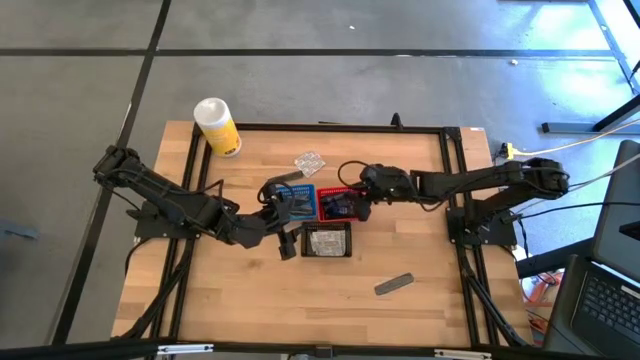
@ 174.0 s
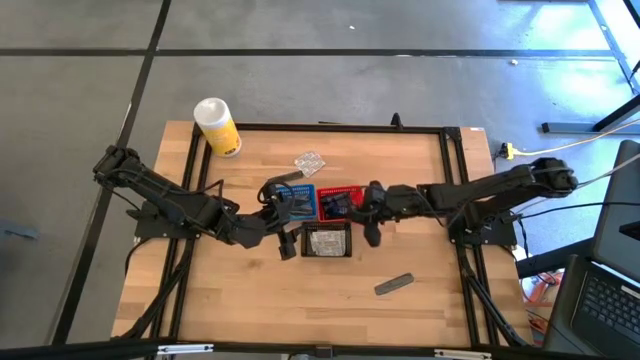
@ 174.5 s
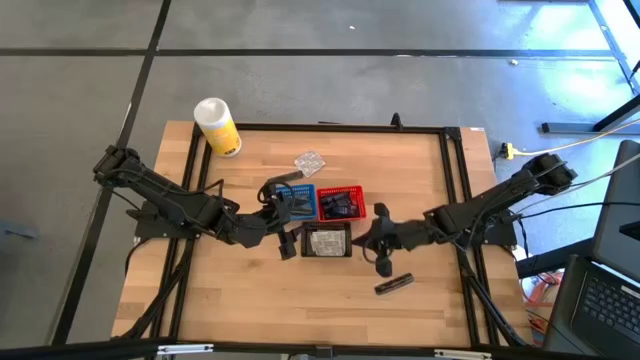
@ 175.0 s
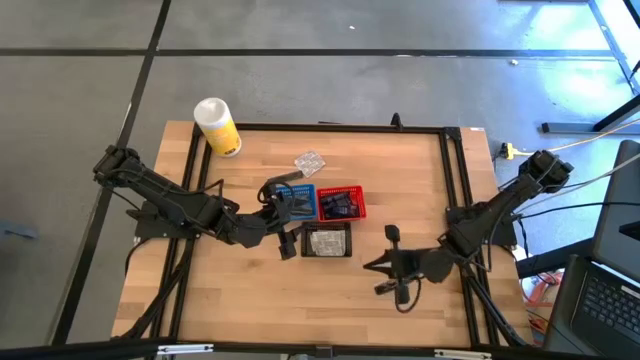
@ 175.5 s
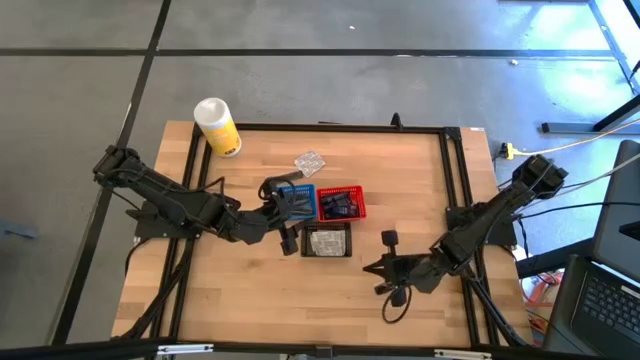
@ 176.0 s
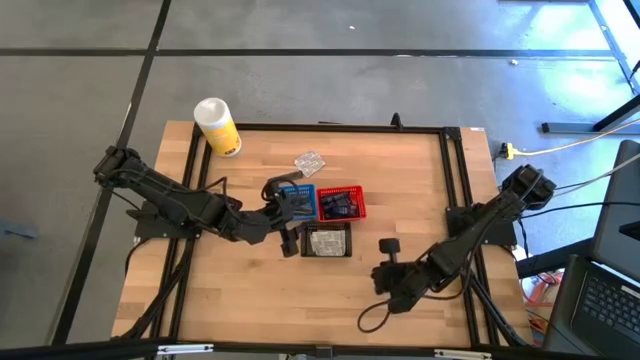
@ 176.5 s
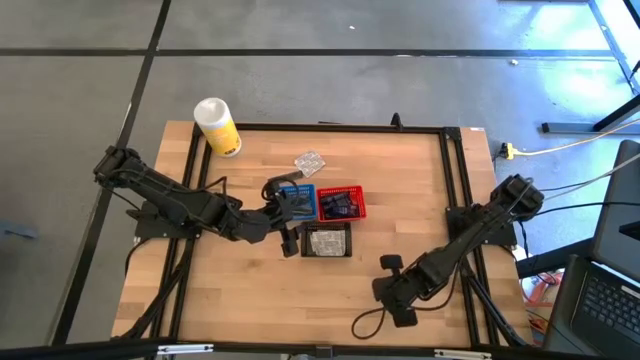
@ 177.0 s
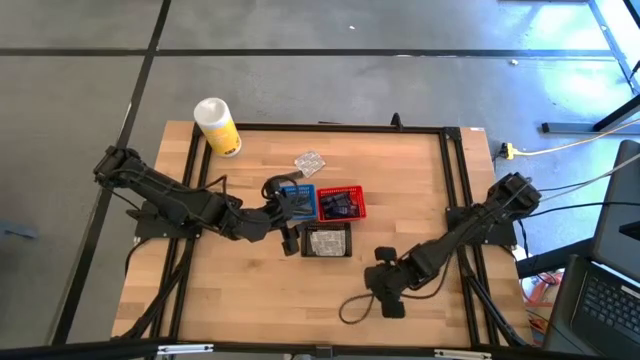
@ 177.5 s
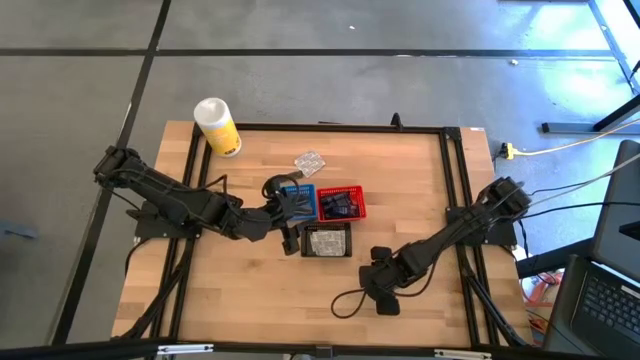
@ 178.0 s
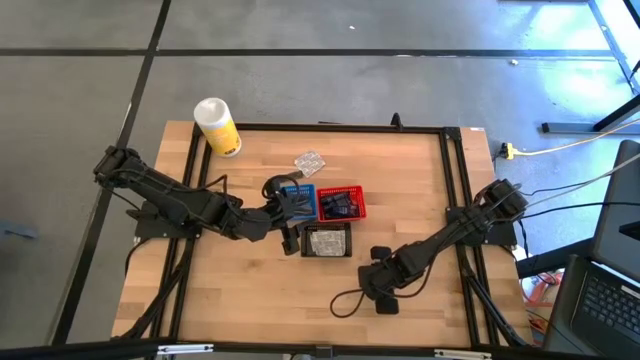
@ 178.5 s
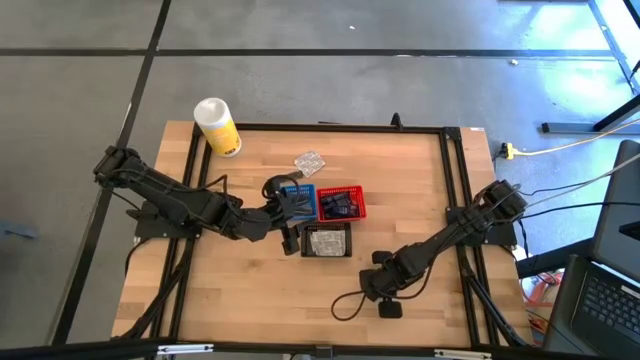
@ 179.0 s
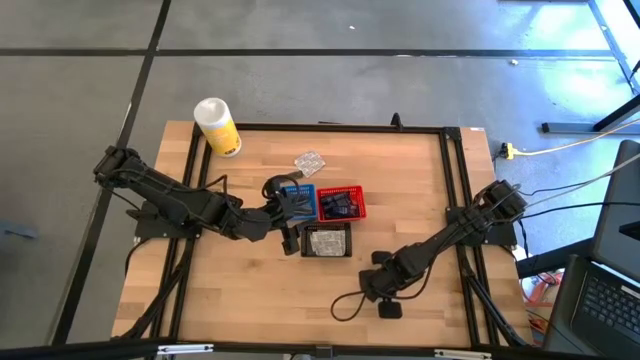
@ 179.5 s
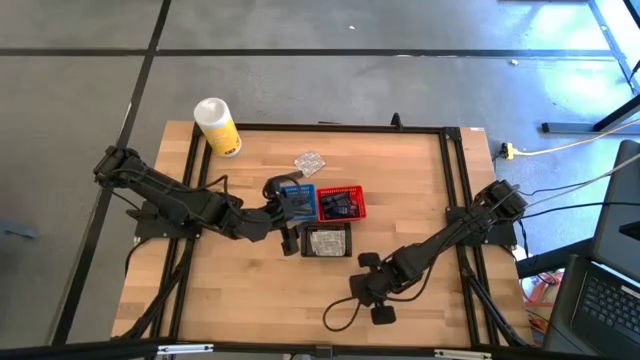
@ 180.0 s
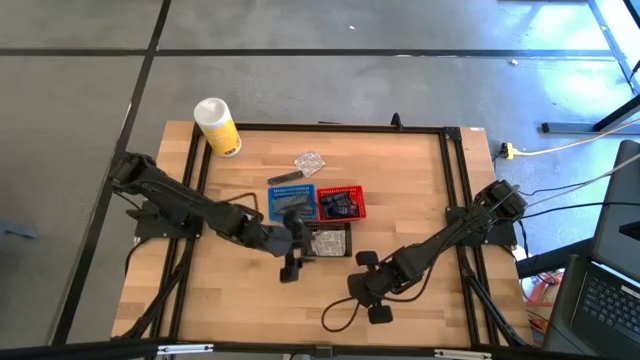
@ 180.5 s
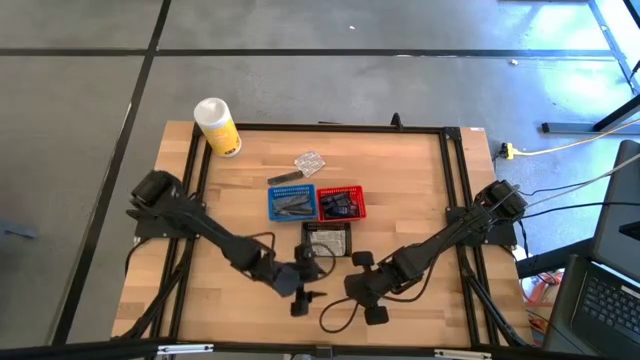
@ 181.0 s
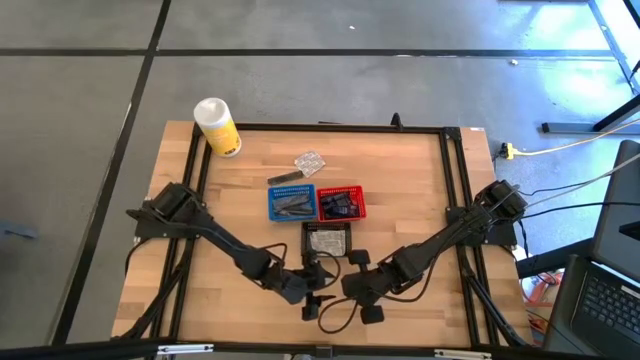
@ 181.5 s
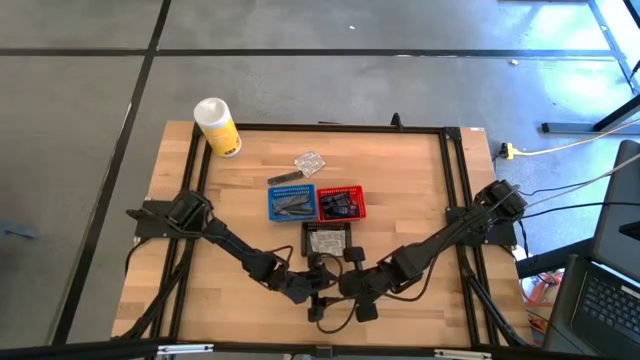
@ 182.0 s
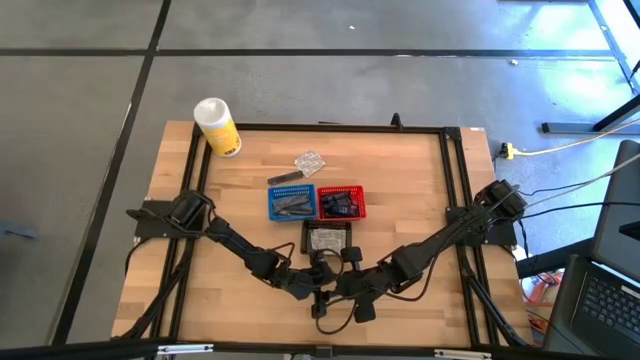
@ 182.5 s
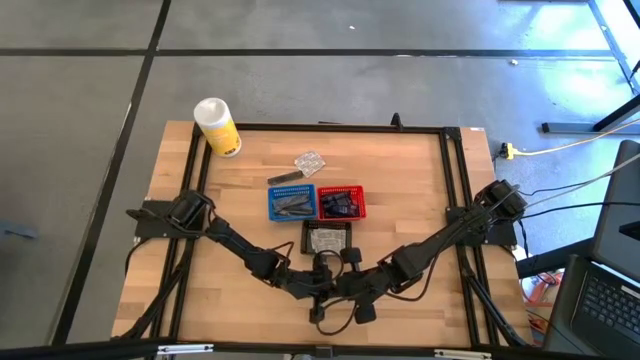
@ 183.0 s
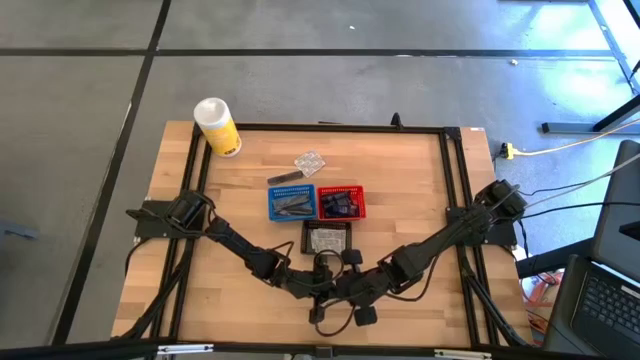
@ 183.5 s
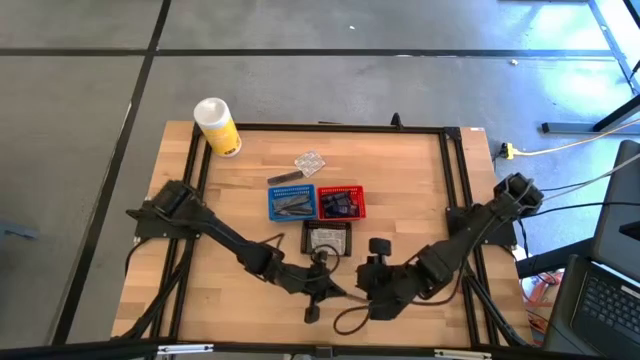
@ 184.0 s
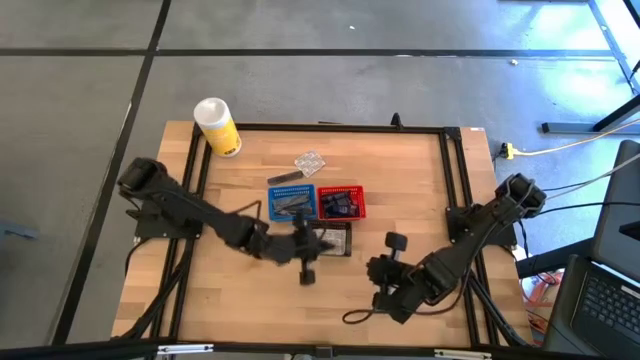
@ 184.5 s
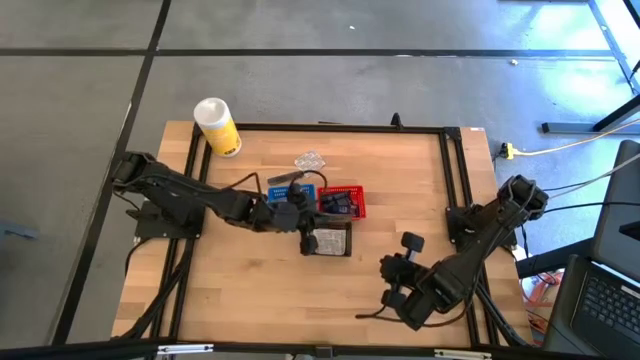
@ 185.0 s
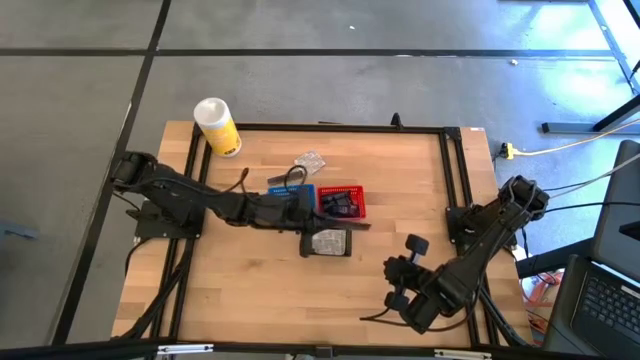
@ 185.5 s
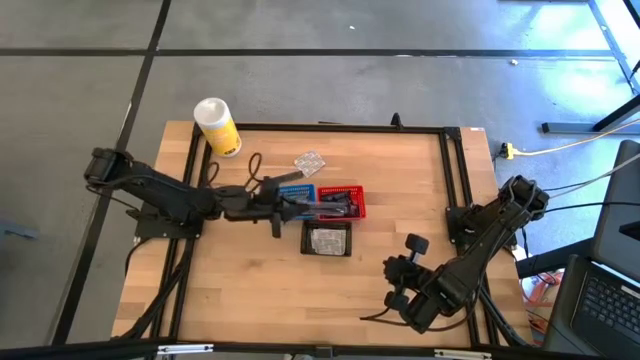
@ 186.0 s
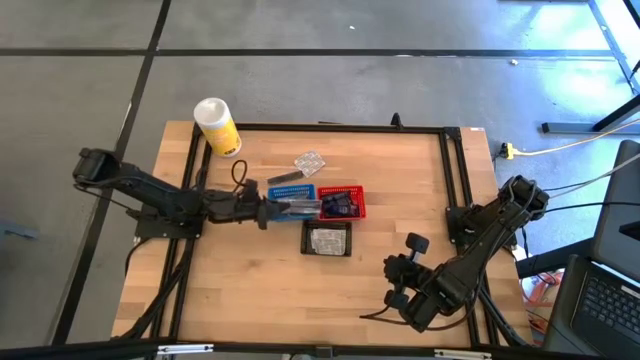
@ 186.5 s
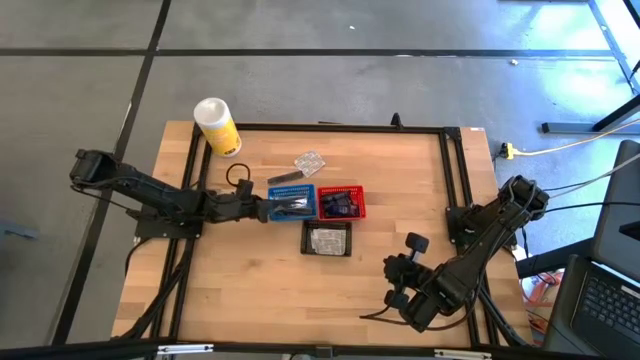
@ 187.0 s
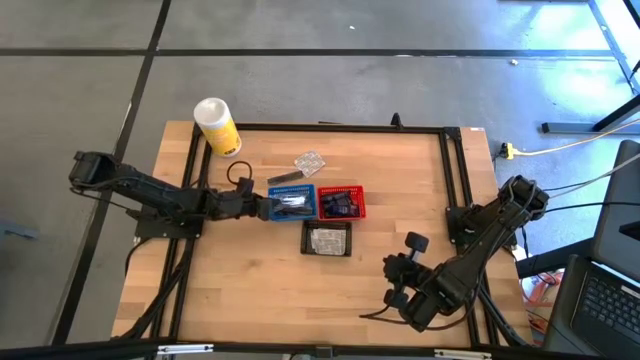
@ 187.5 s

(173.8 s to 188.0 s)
Task: Pick & Place Travel size toiletries
Put the black comb into the blue bin

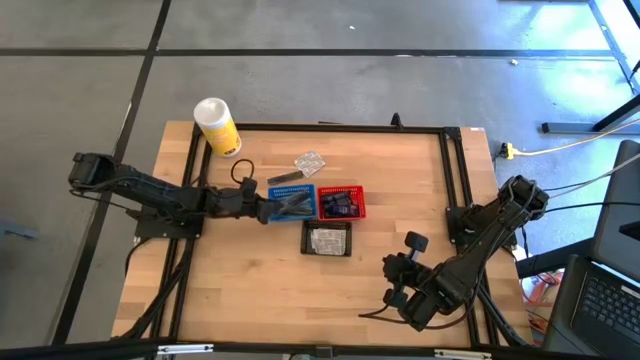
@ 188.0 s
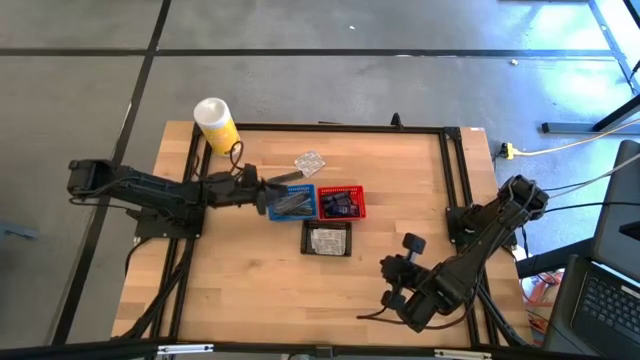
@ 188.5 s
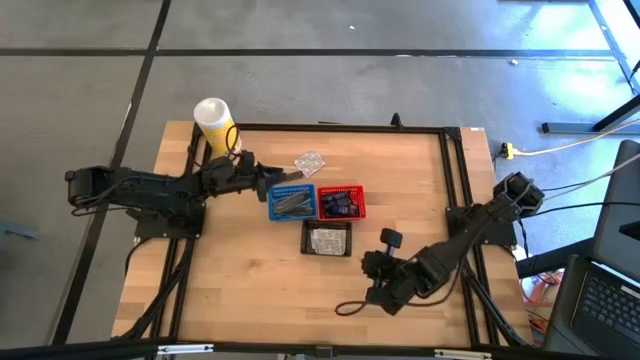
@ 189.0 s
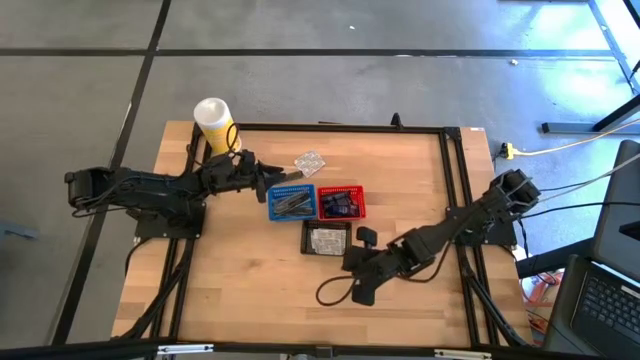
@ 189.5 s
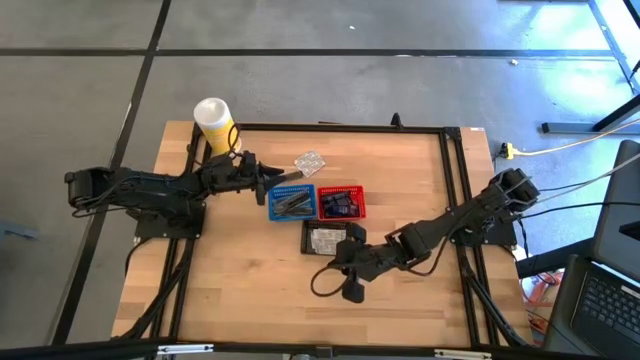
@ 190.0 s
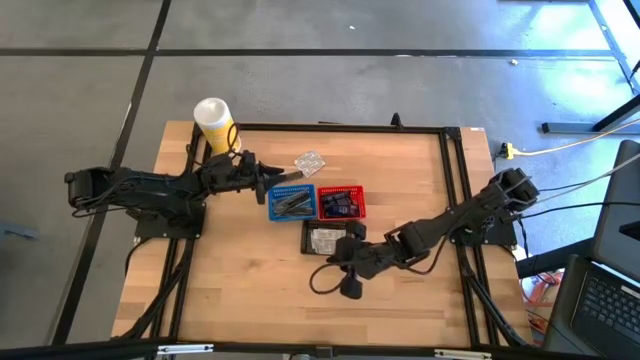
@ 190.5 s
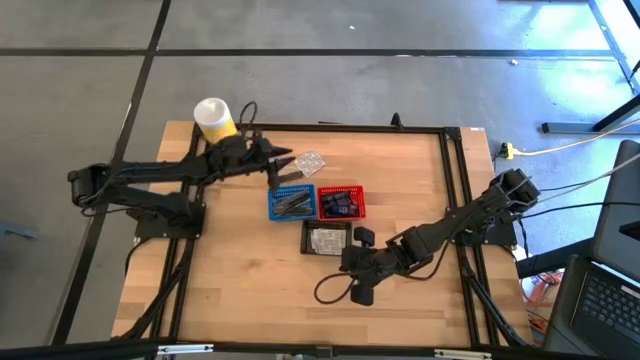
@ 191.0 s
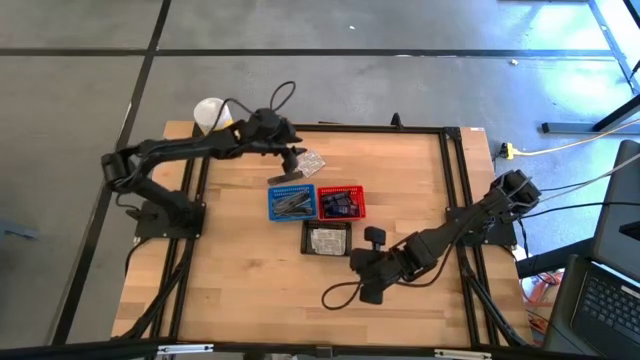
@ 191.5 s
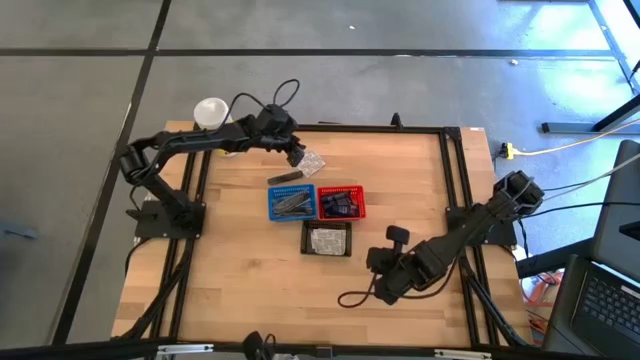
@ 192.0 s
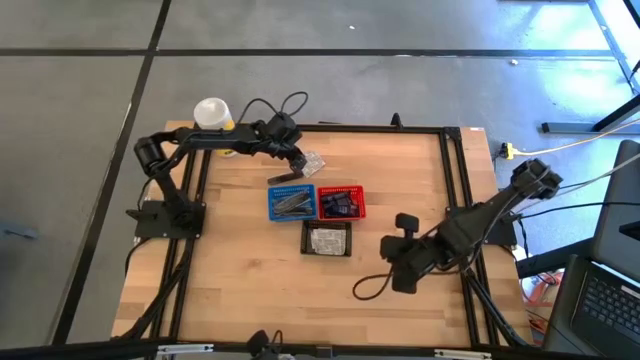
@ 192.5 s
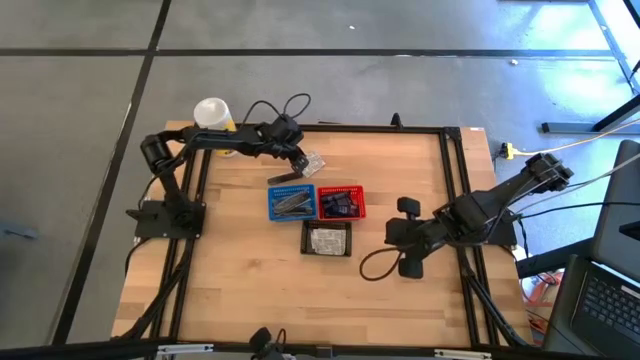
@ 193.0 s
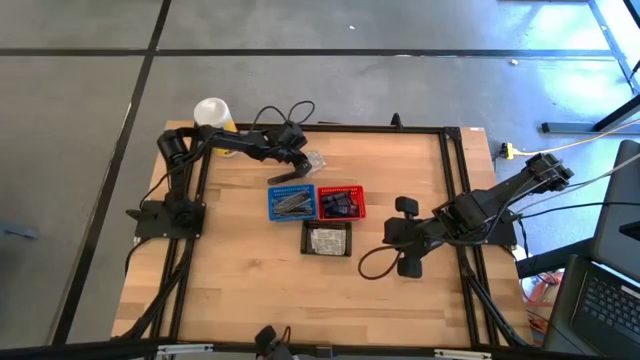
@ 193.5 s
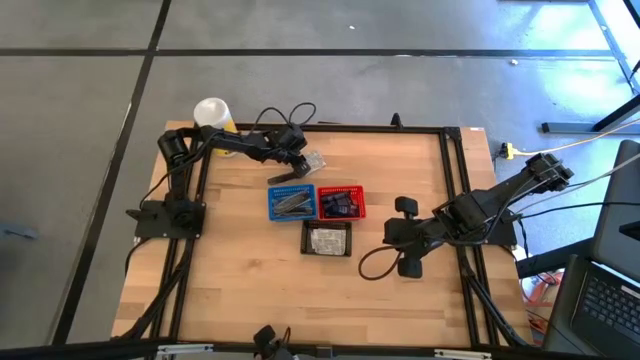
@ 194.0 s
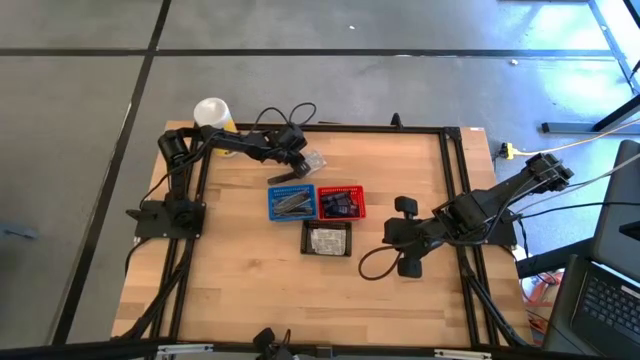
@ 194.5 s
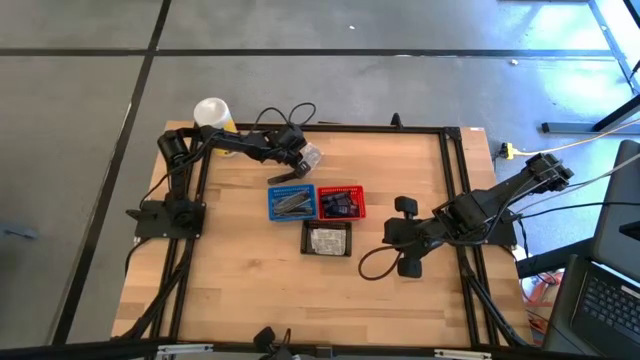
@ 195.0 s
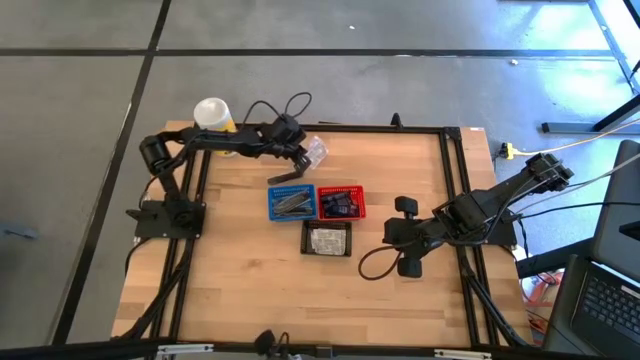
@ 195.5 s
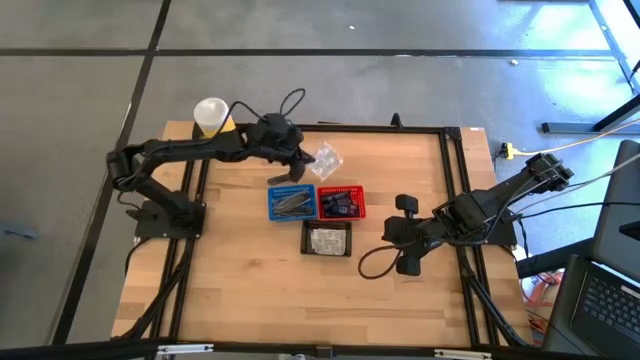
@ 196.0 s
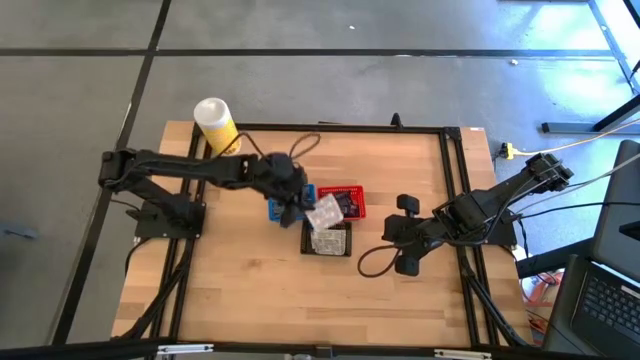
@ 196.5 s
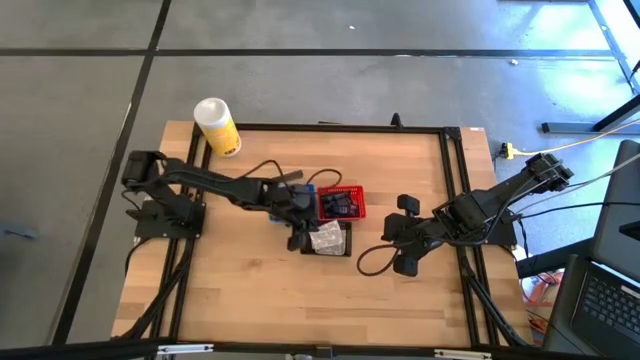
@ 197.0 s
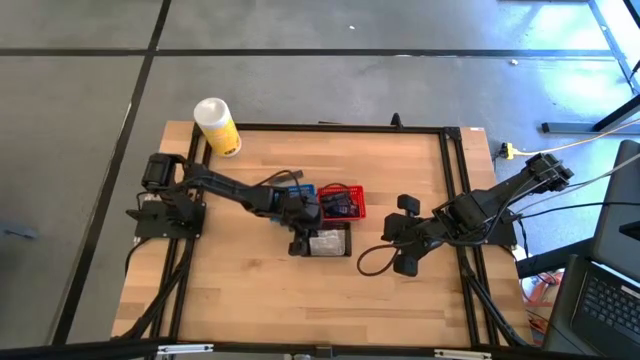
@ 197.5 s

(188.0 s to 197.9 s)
Put the white bandage into the black bin
